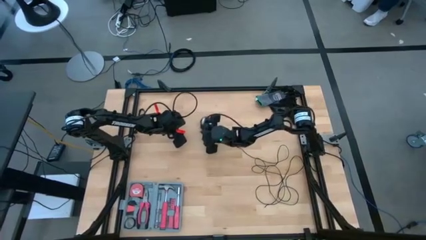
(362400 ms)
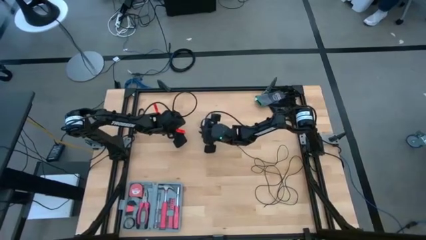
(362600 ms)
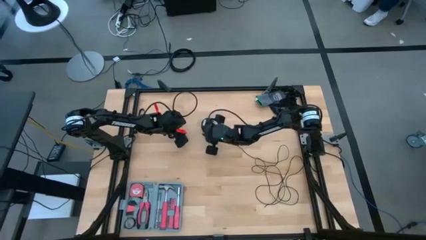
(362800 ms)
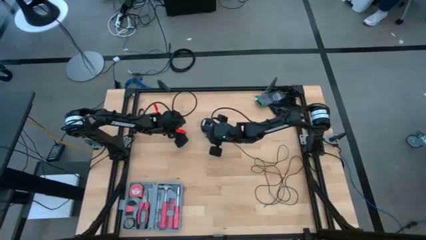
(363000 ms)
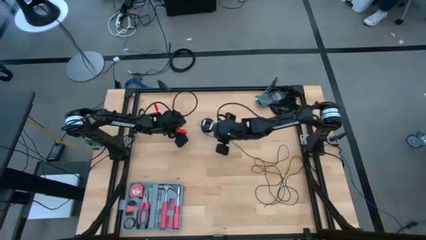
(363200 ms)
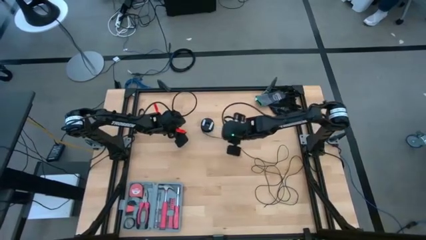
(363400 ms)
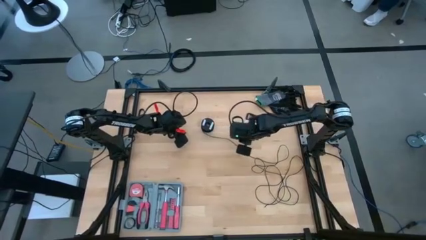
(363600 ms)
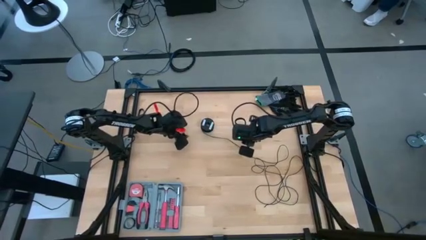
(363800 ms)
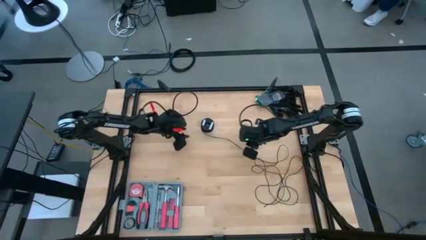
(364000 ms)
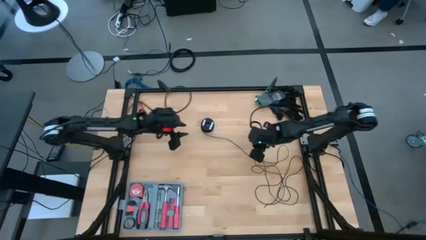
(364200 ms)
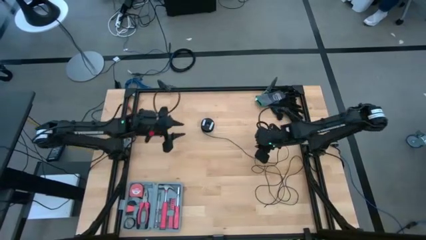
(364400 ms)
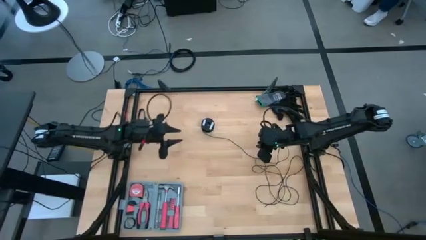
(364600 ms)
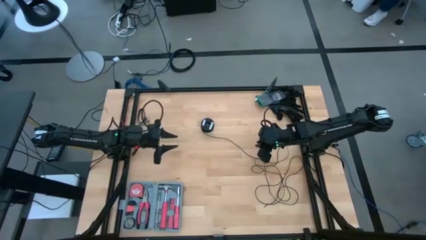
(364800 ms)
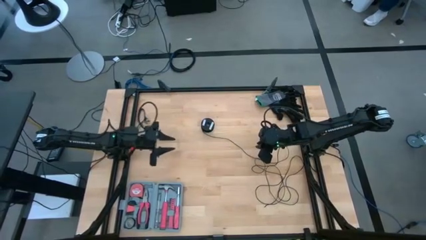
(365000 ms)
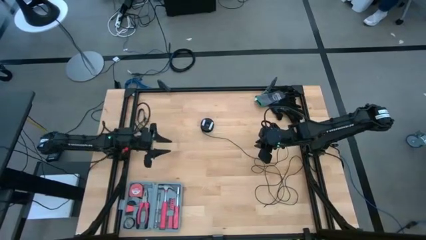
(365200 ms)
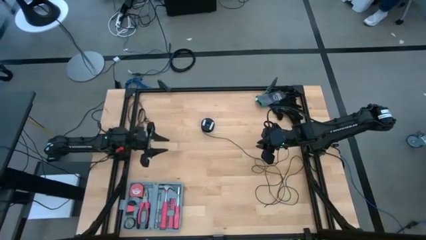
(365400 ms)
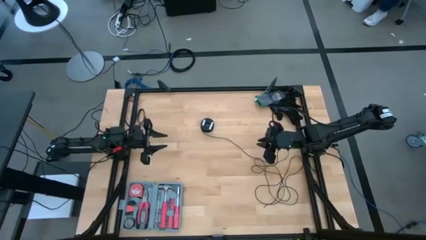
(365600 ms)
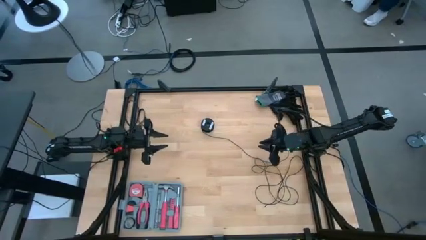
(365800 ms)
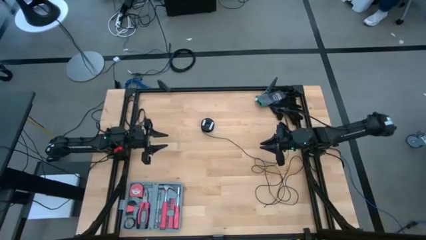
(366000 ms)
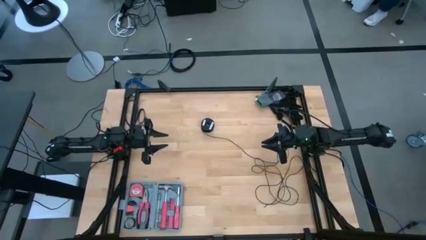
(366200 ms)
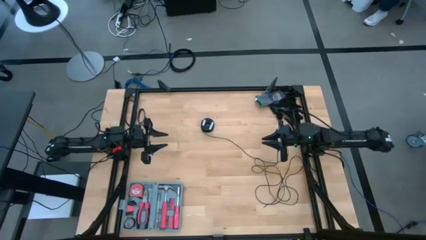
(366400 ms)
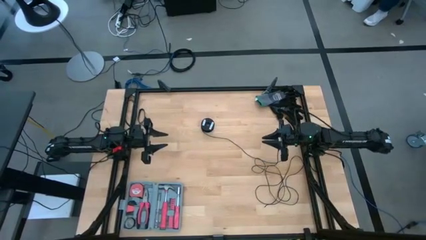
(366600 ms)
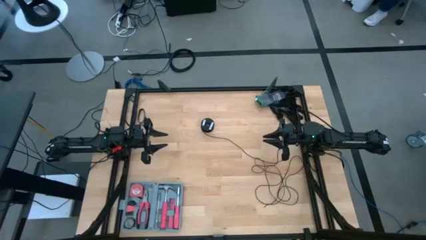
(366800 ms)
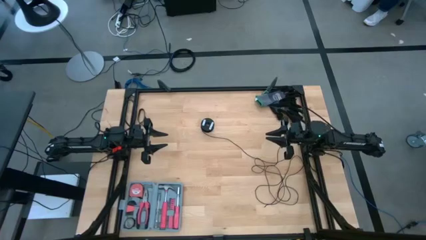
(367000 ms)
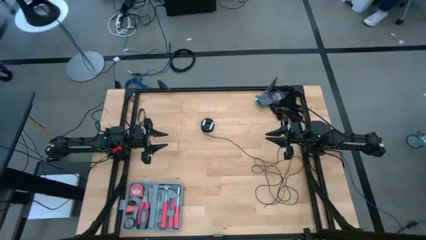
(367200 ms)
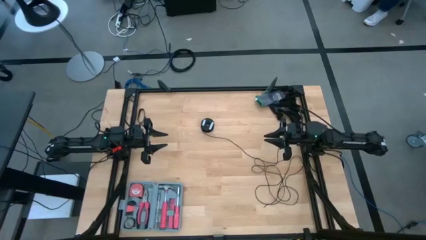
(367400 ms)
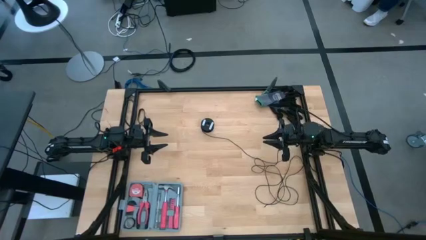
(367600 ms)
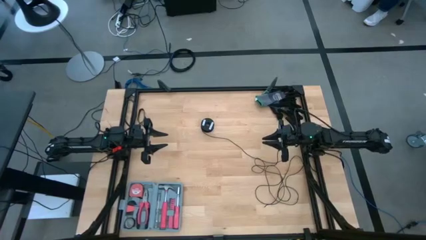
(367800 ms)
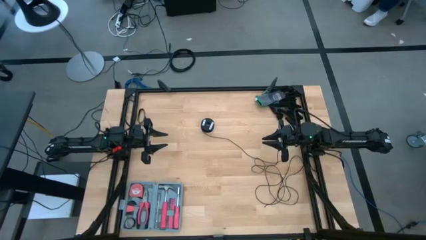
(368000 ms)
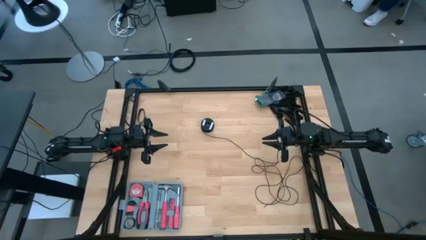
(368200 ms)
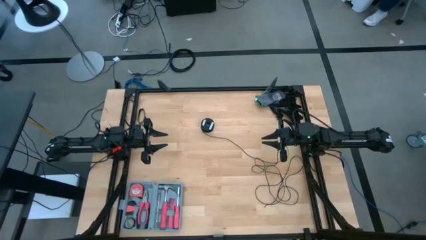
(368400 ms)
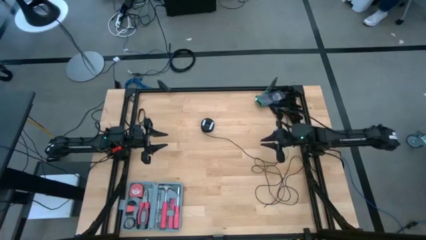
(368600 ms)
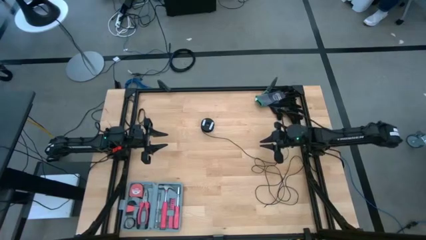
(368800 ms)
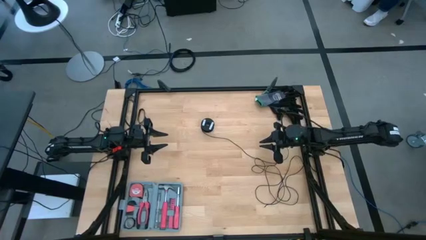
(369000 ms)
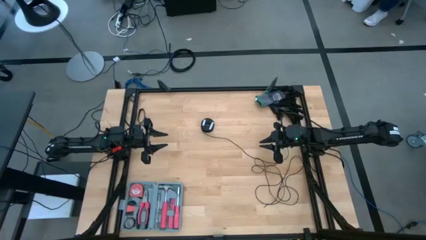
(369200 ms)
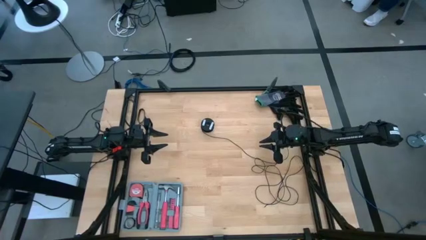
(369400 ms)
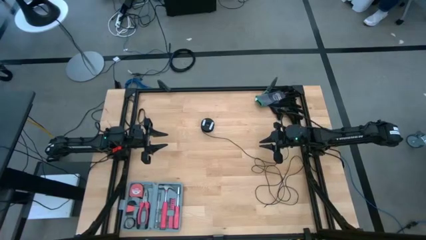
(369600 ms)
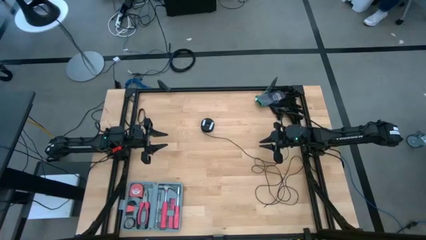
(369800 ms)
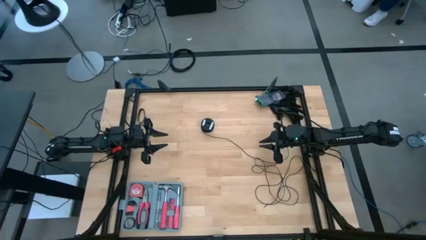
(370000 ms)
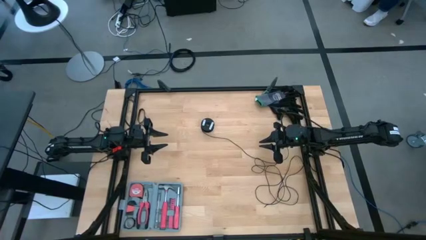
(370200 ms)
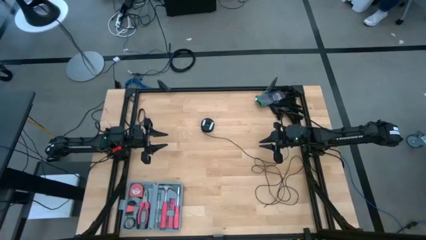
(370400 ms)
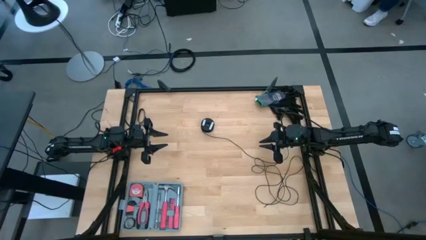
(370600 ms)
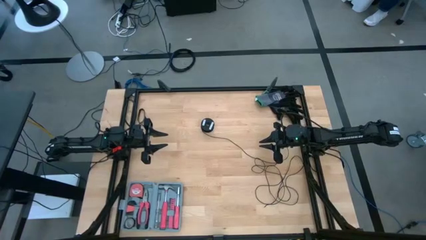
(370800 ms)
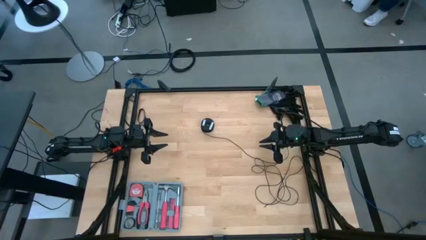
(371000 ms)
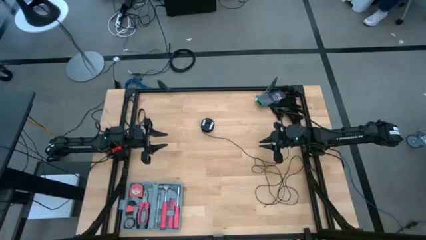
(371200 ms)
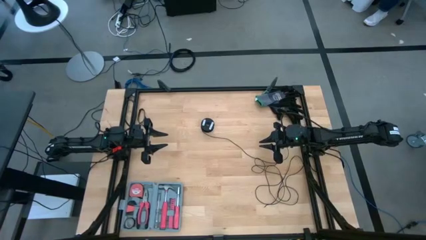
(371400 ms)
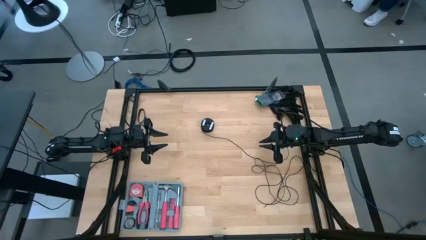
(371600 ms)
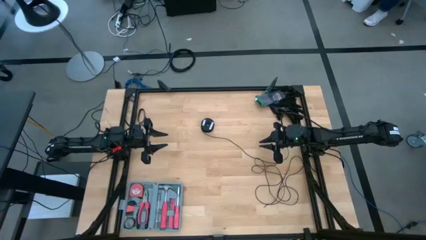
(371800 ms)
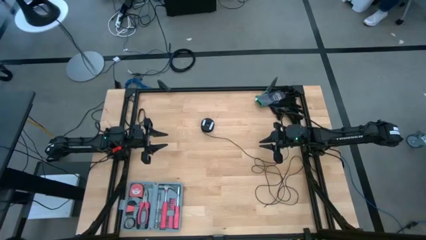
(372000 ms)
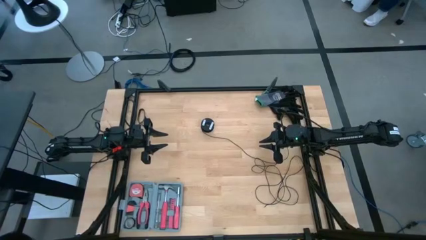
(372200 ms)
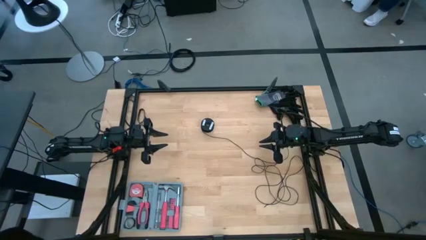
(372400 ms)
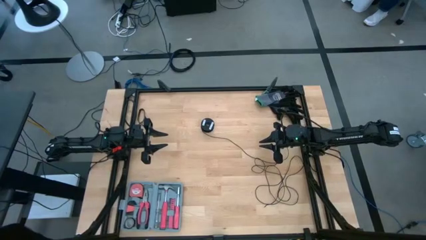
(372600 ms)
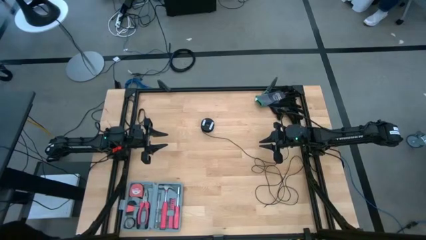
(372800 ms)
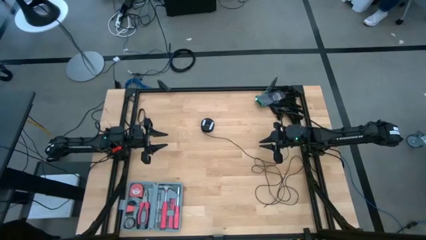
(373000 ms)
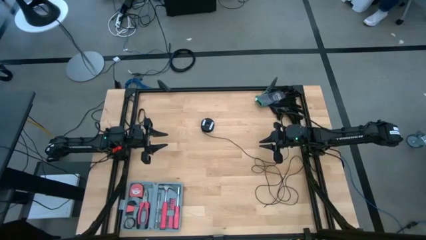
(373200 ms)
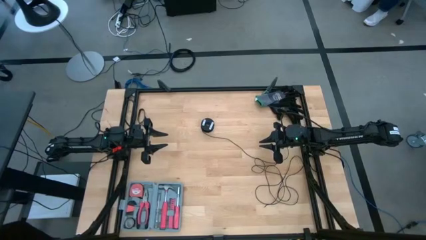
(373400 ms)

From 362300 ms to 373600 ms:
Task: Coil cords
Return to Home Position

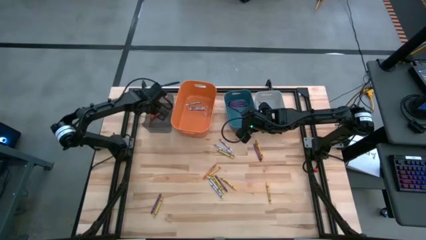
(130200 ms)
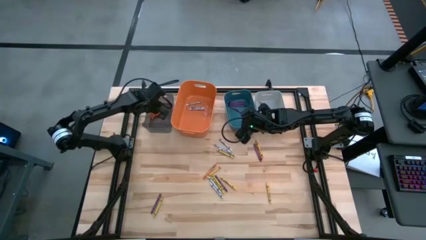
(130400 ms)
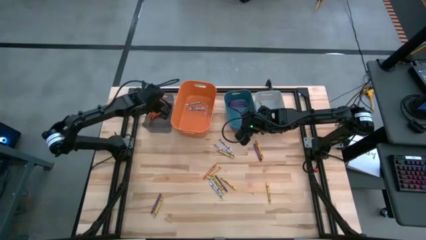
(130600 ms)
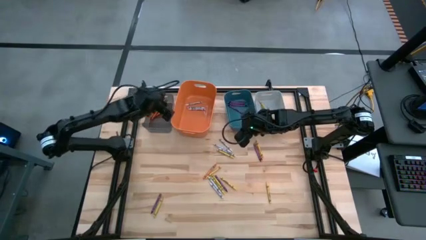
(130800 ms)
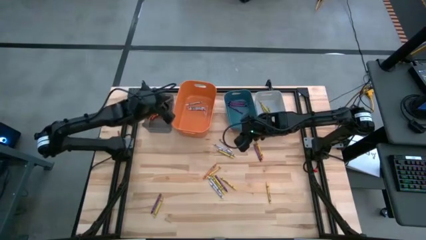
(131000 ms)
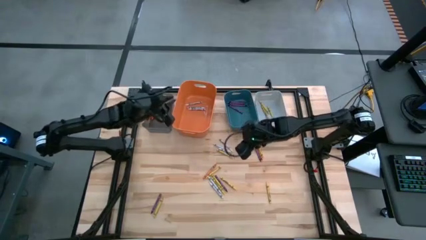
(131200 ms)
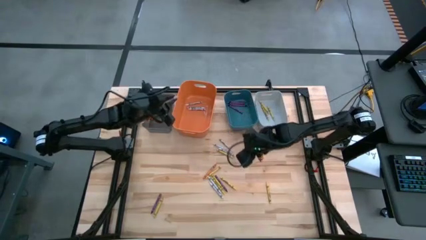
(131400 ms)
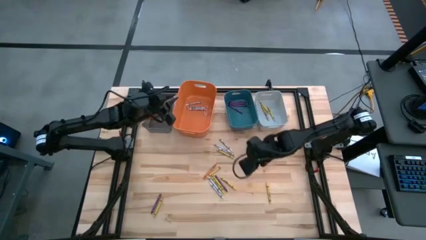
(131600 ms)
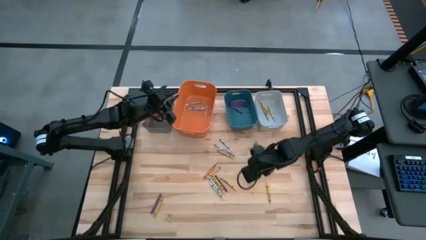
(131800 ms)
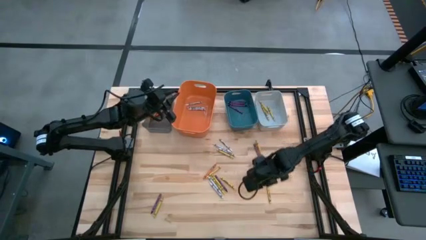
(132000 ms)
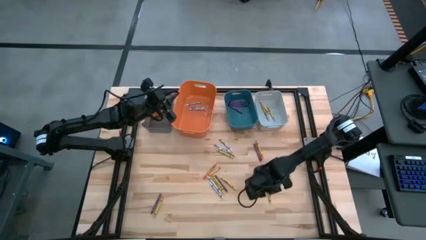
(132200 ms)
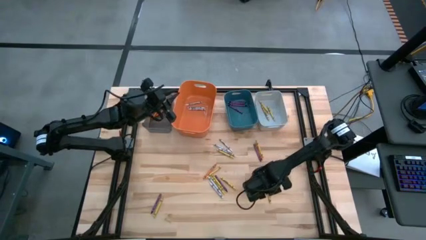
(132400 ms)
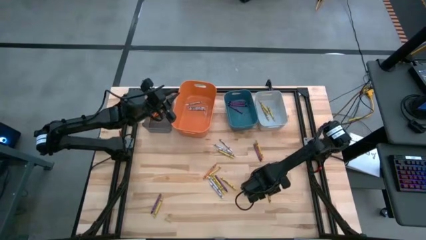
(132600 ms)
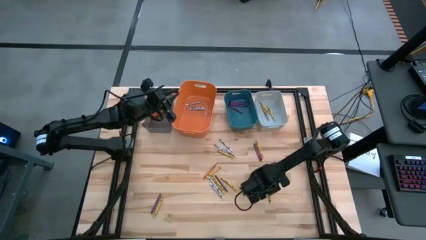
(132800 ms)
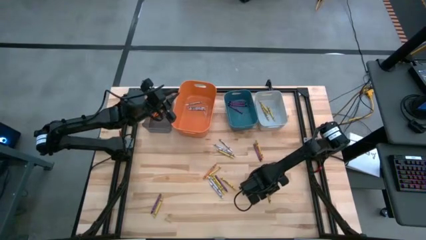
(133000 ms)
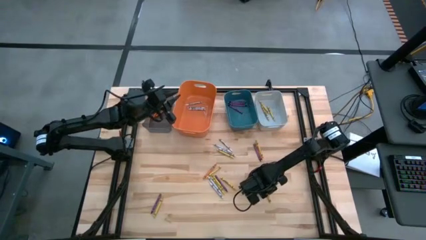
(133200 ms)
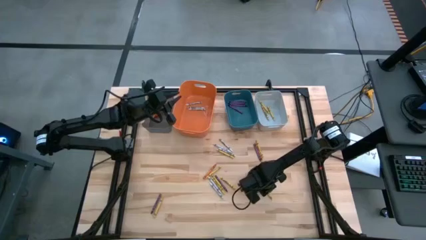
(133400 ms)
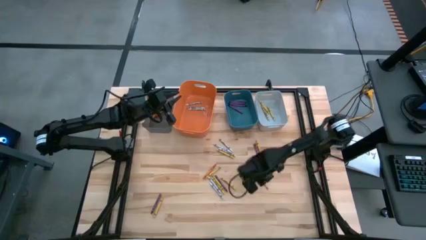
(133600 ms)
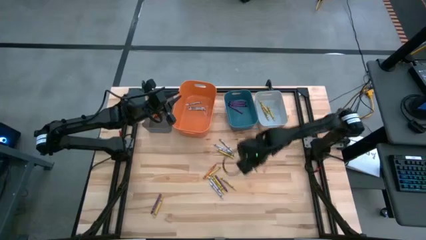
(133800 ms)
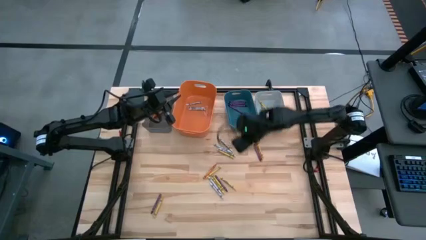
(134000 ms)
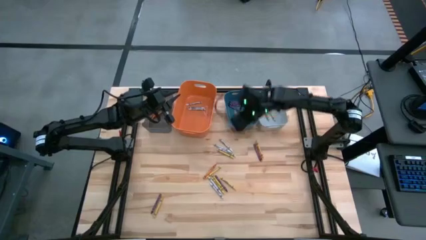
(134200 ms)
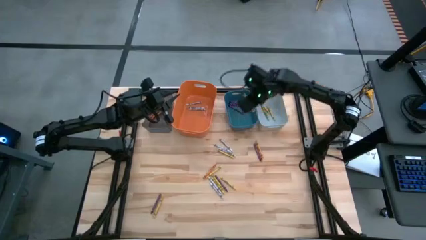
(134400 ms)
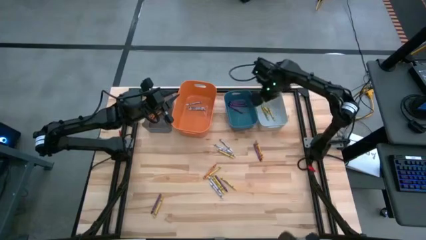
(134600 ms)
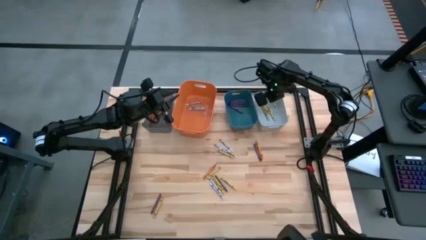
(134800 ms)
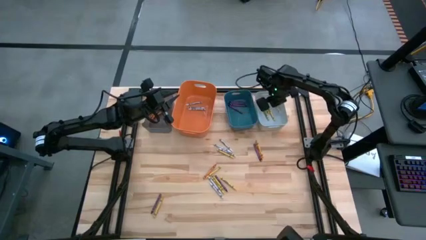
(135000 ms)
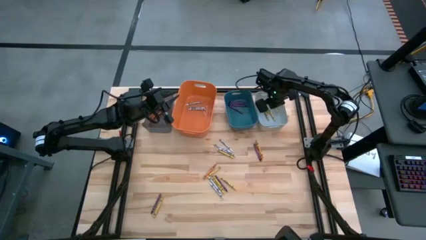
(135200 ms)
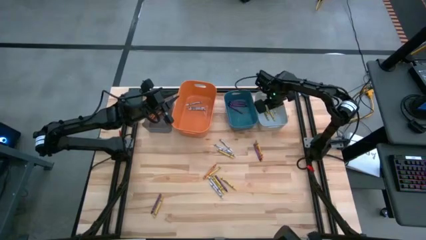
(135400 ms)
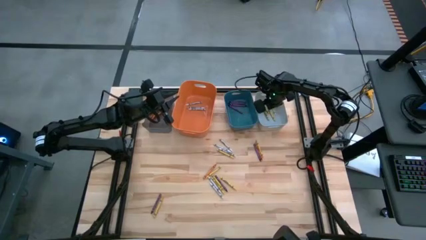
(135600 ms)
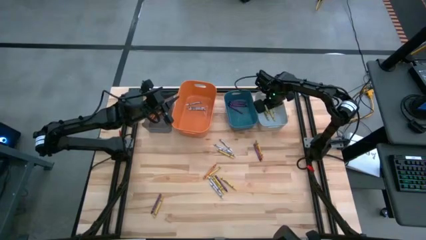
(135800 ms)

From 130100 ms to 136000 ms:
Task: Sort crayons
Put the yellow crayon into the white bin
